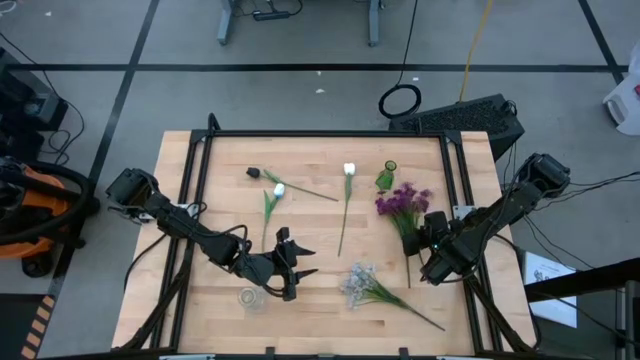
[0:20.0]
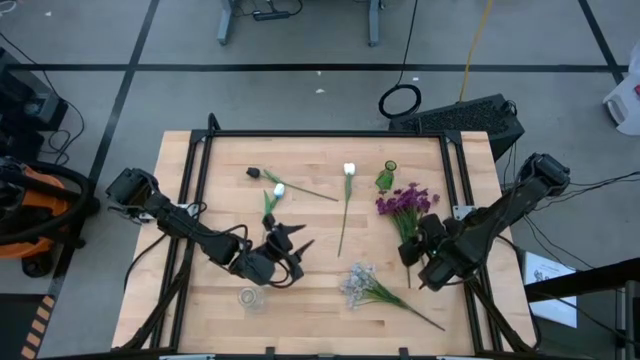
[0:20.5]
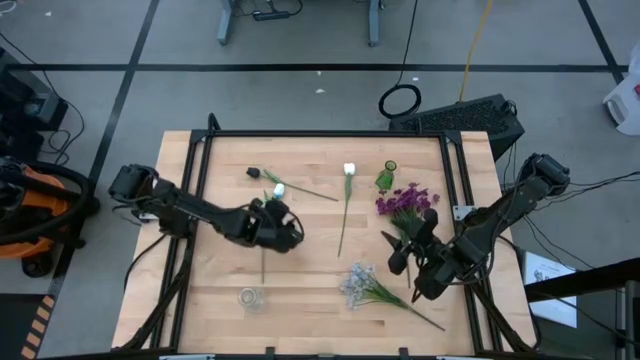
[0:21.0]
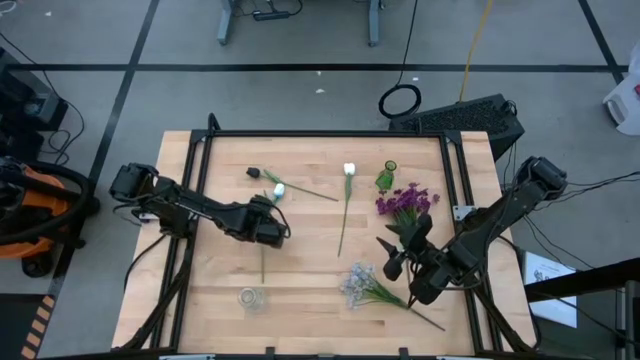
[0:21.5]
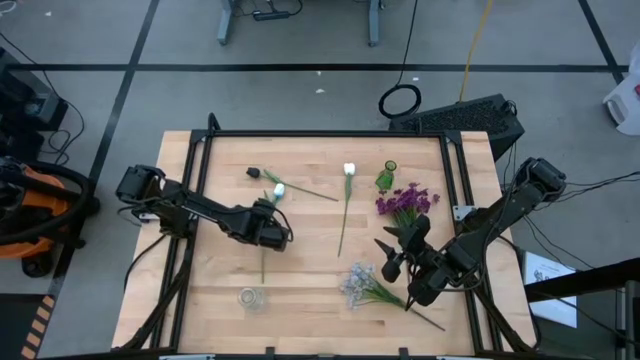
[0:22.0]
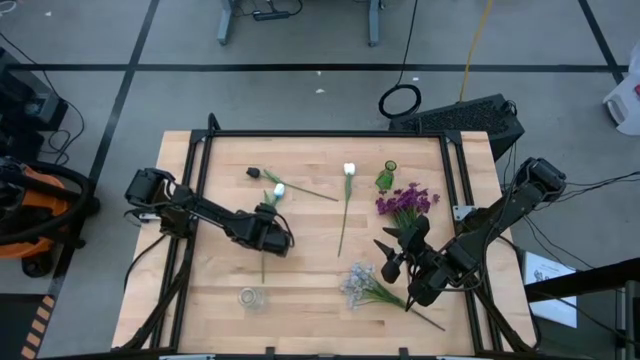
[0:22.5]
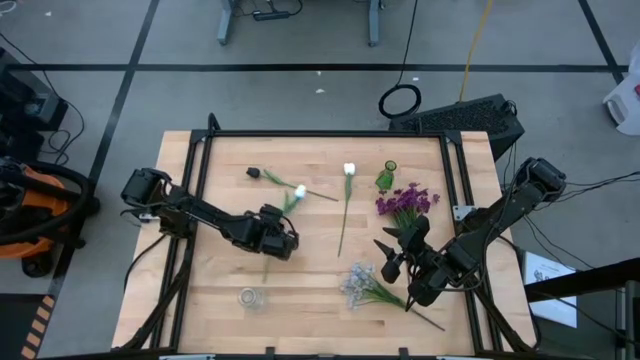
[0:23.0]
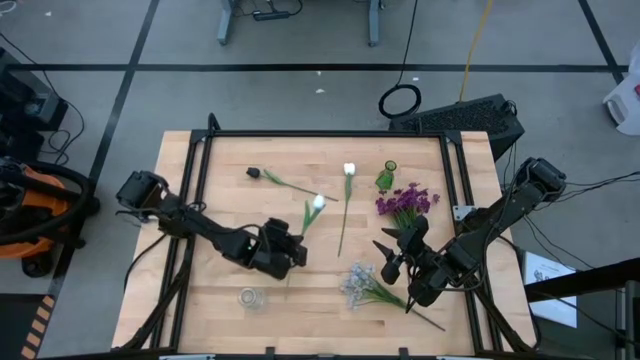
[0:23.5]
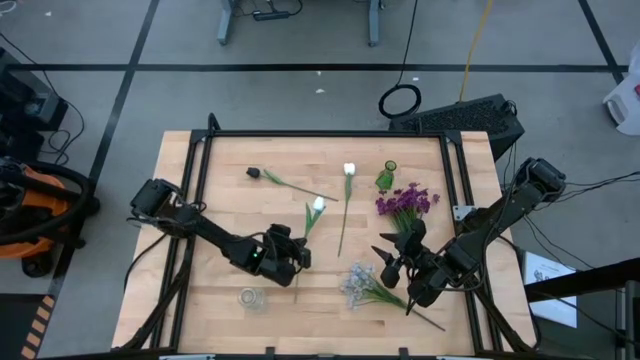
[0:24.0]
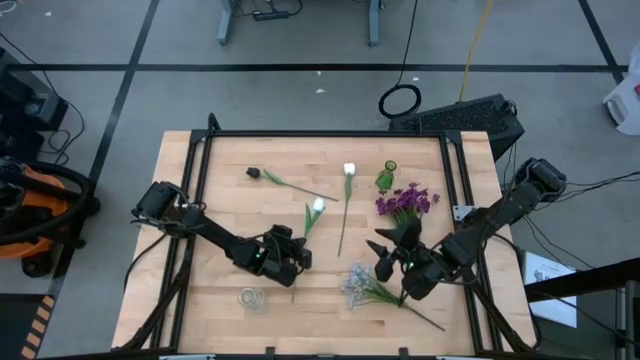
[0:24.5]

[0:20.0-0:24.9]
Task: Sort flowers into vase by color
Move the left white flower to the center of the table

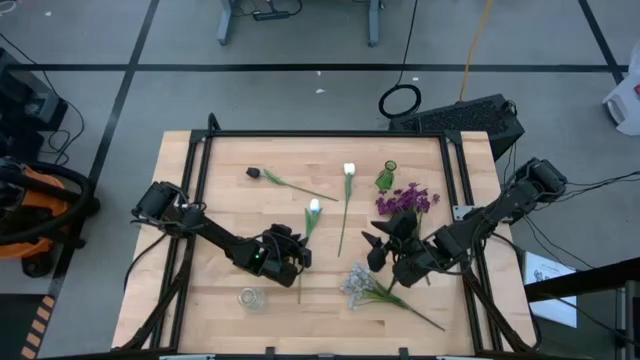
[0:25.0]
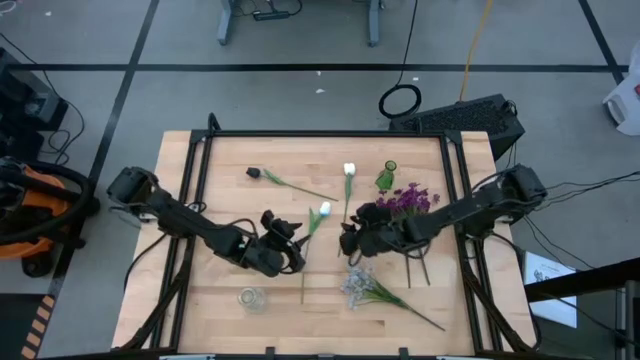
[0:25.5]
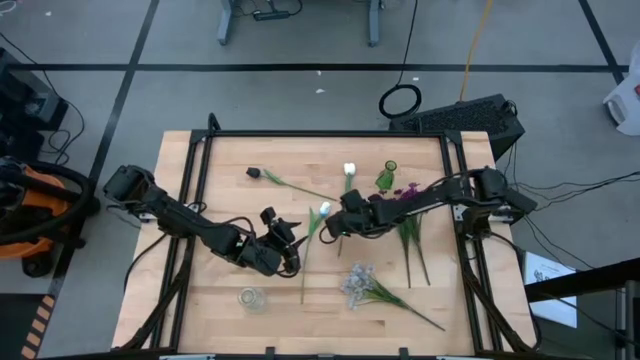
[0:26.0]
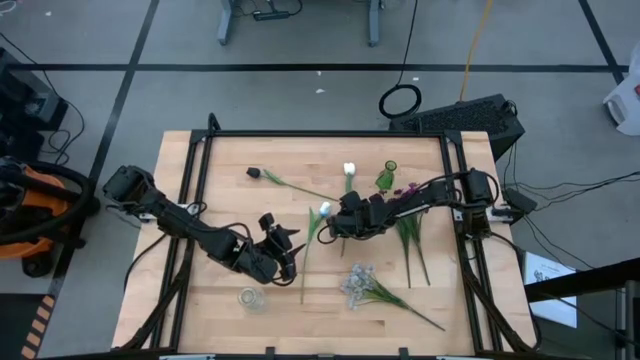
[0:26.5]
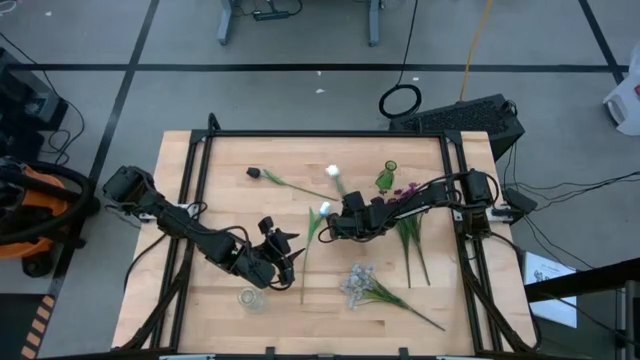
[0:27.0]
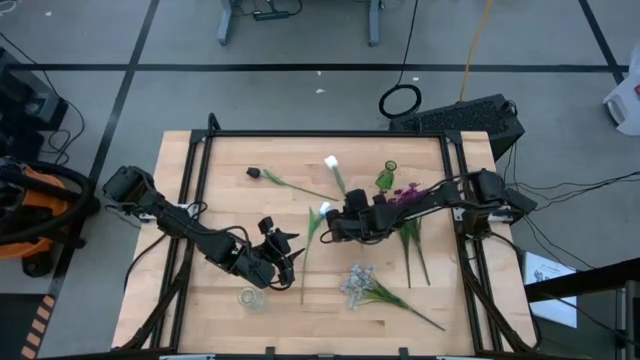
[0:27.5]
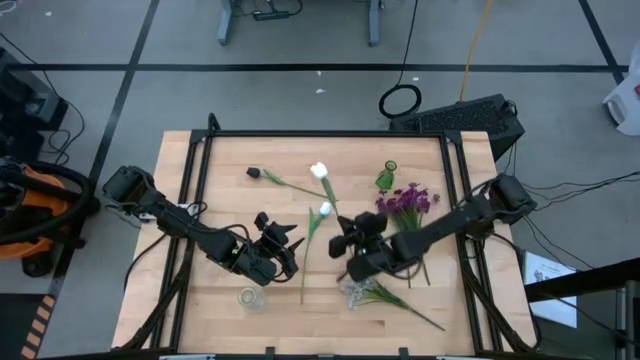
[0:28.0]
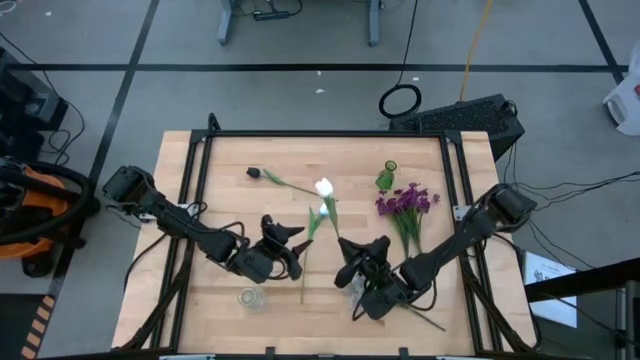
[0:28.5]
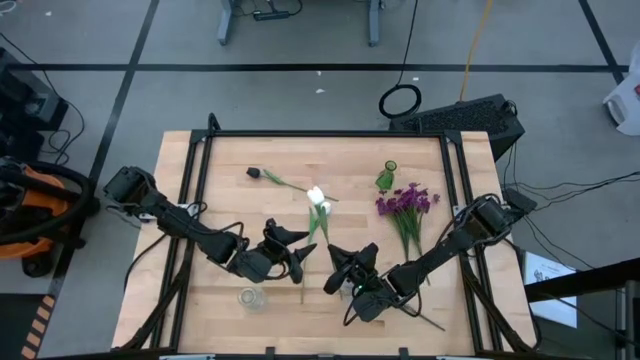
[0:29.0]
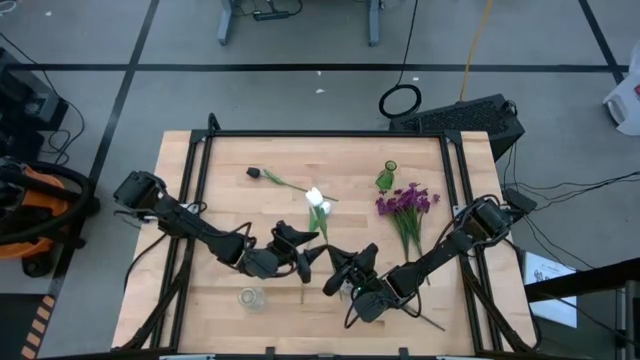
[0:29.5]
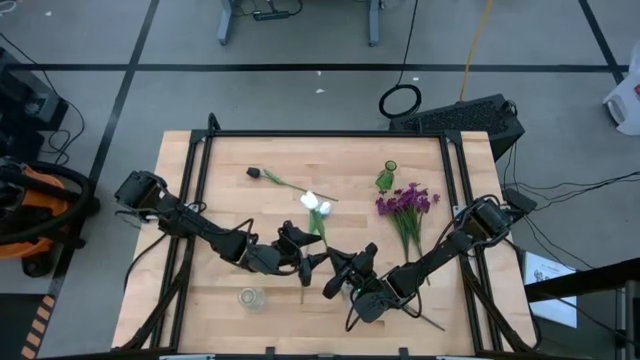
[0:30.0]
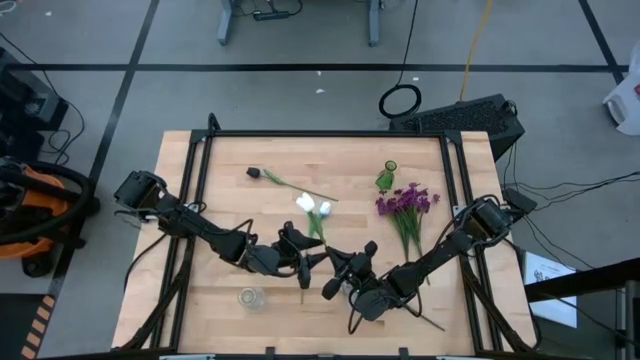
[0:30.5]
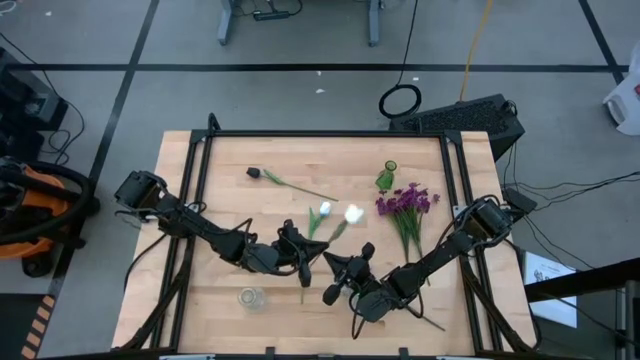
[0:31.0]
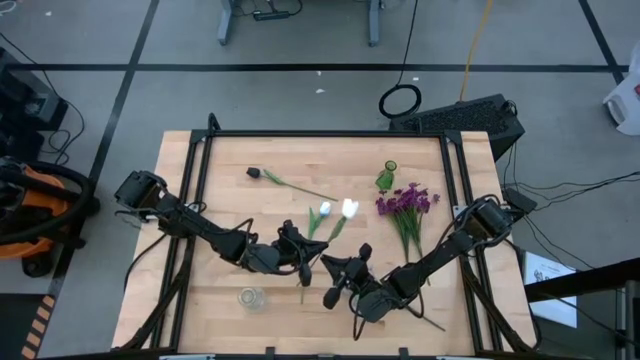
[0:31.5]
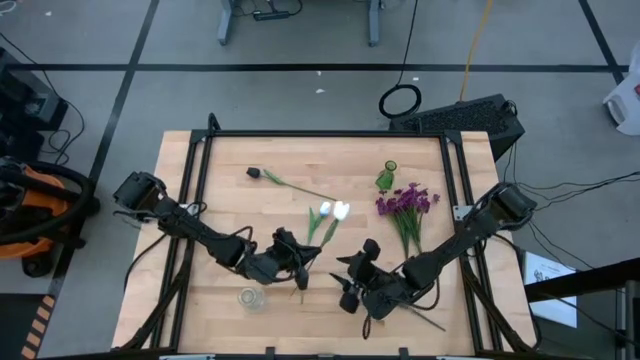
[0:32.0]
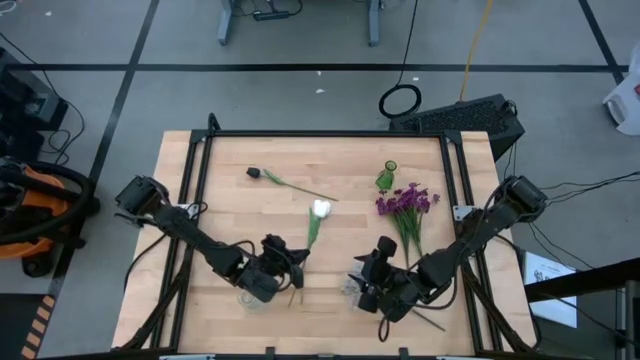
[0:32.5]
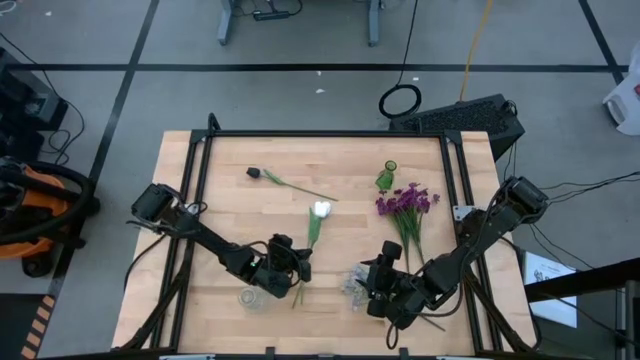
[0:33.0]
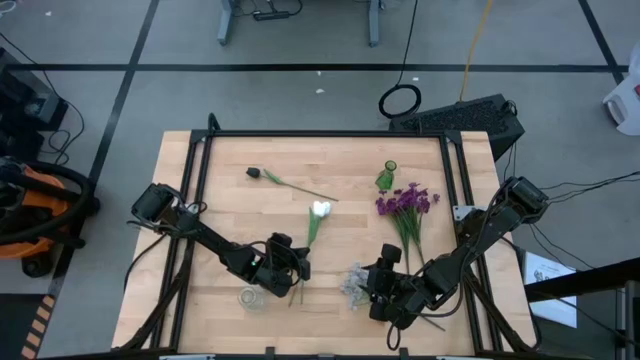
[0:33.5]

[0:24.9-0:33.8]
Move the top white flower to the center of the table

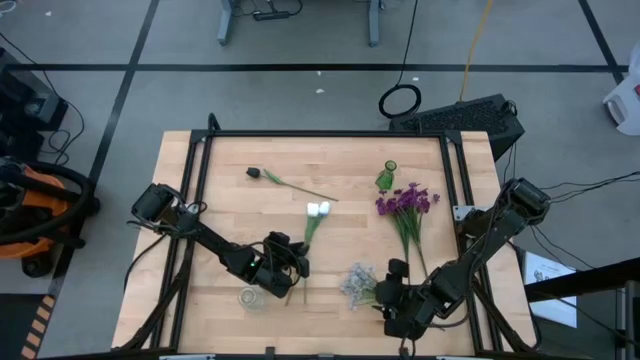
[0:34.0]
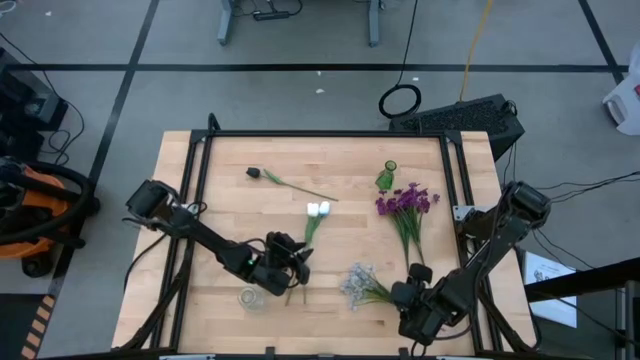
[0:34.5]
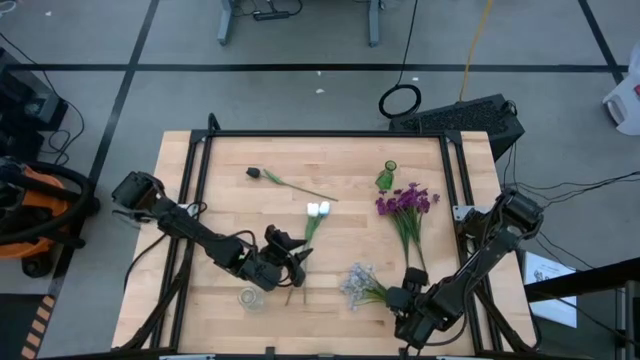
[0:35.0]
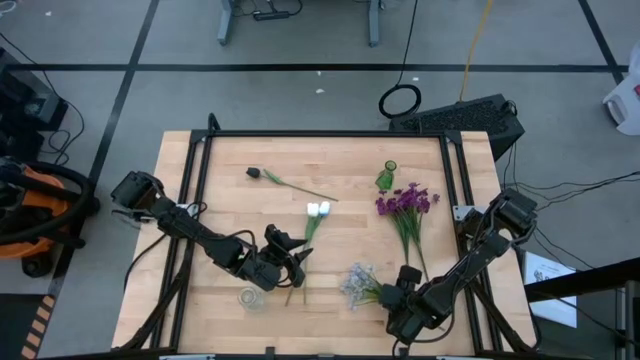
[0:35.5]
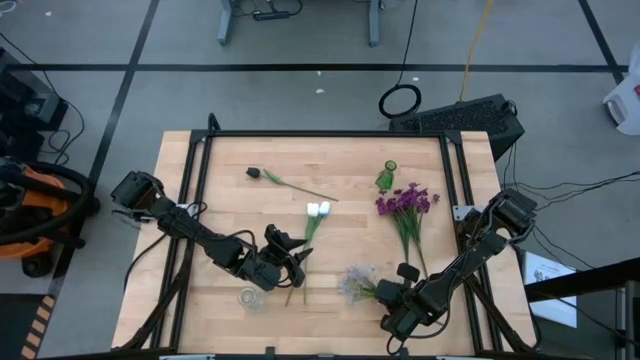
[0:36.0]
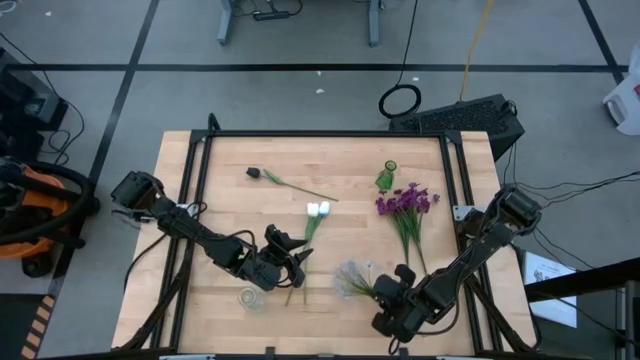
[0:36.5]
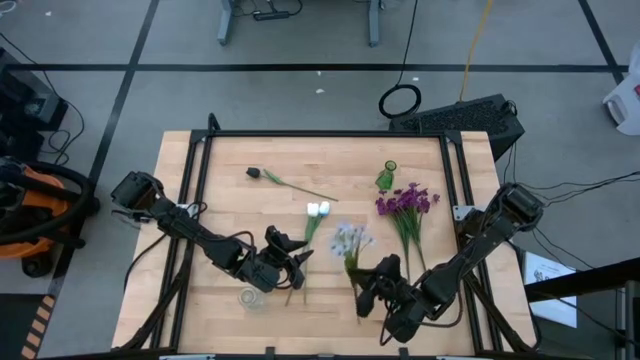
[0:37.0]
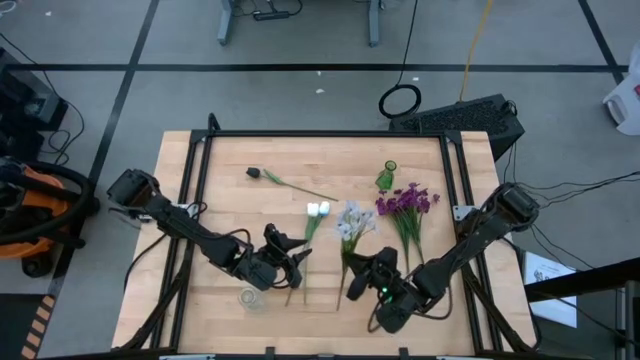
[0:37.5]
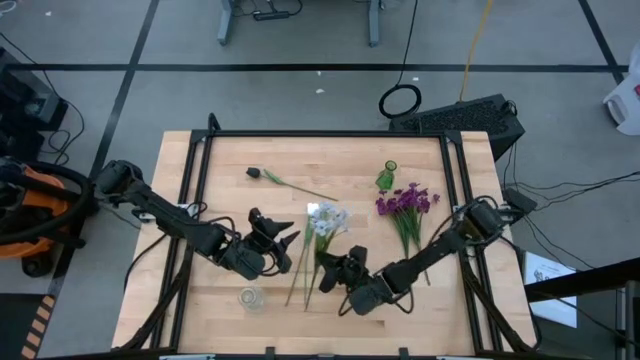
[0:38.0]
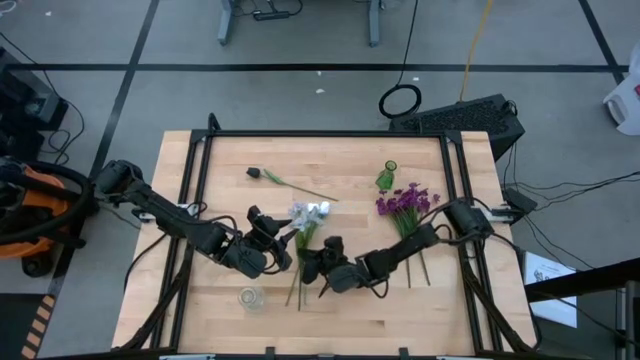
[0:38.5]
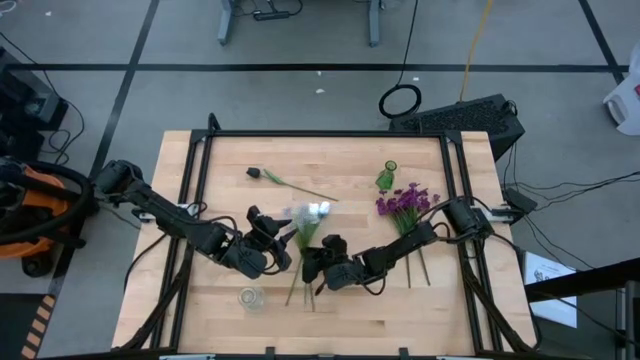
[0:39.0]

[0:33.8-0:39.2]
Move the dark white flower to the center of the table

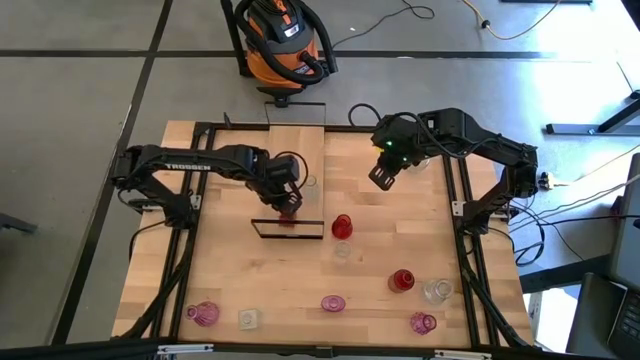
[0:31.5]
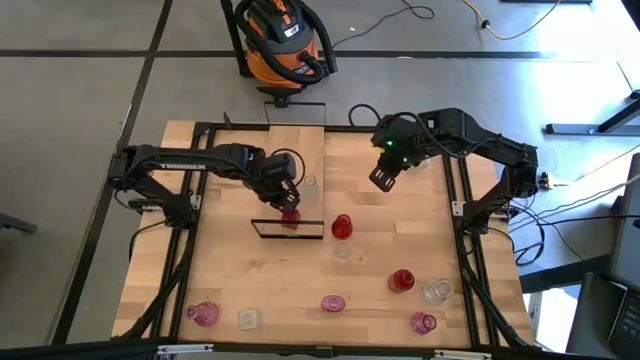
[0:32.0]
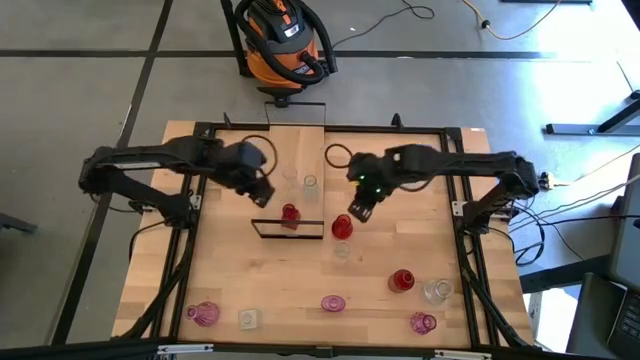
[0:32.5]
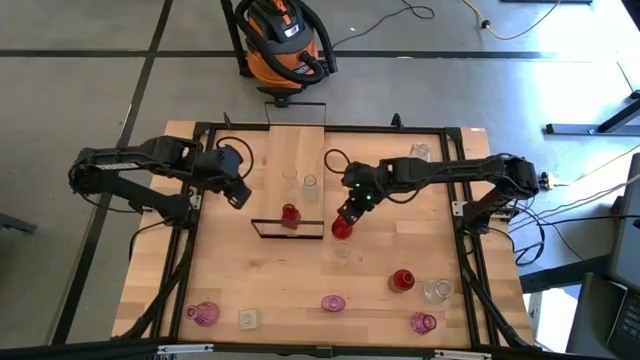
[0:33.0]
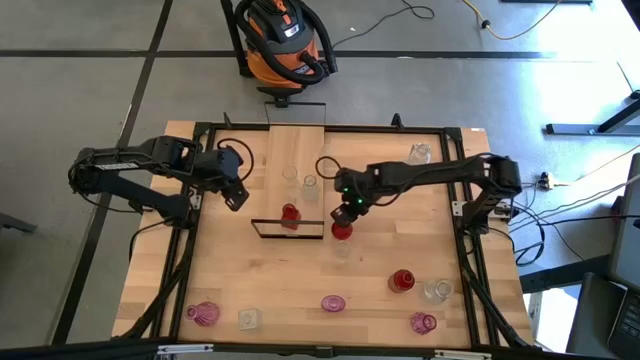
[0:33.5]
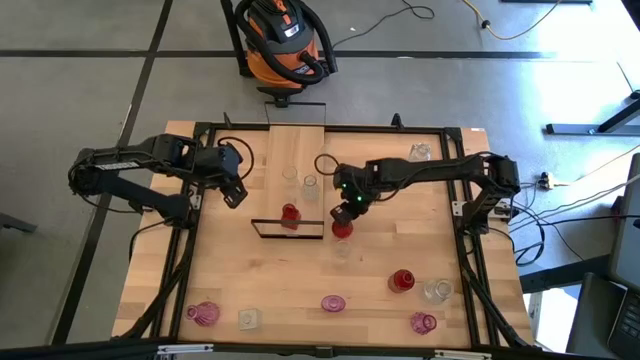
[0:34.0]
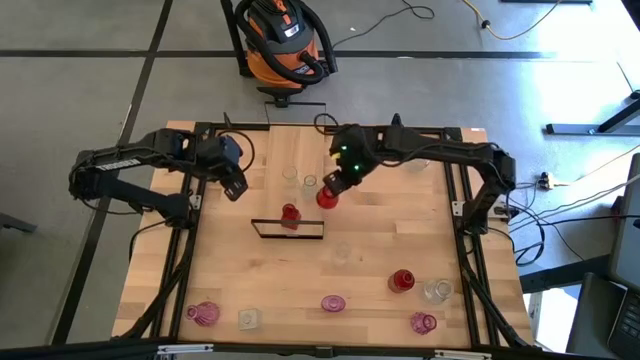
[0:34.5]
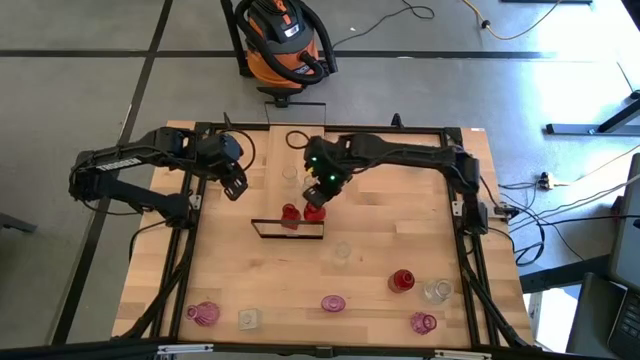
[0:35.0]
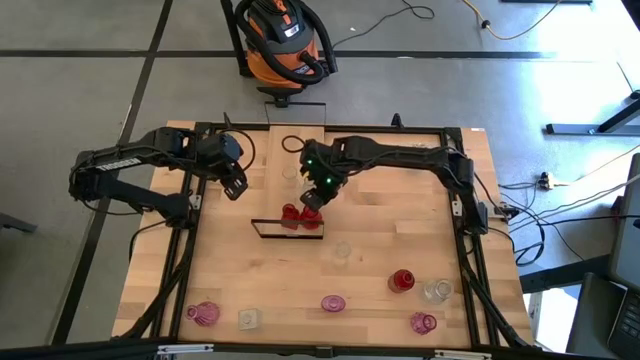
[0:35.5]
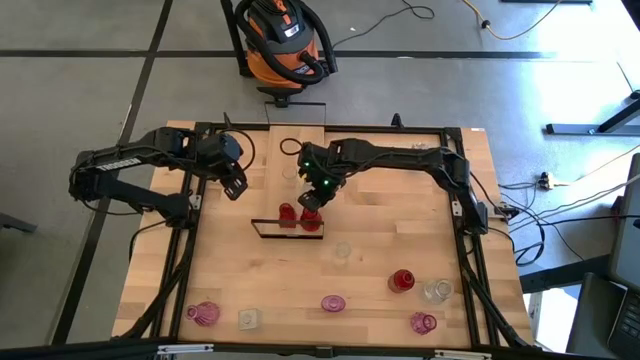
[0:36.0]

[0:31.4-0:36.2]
Task: sort vases onto shelf
Put the red vase on the shelf
